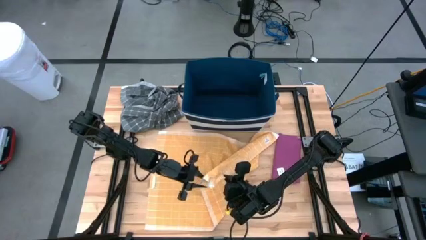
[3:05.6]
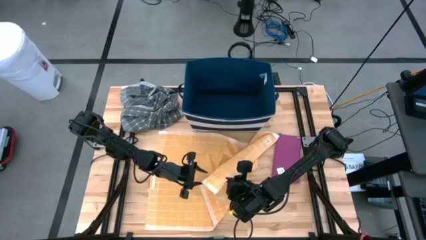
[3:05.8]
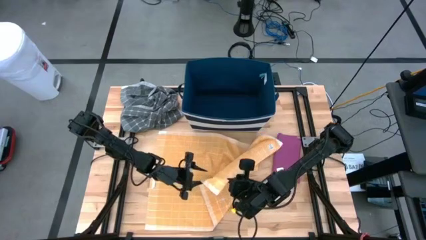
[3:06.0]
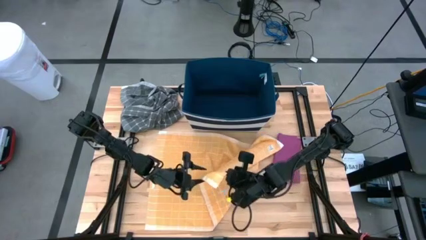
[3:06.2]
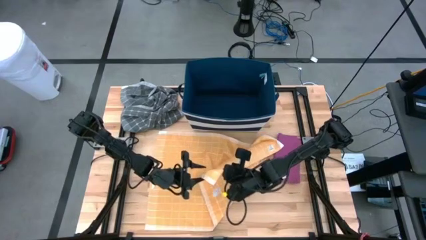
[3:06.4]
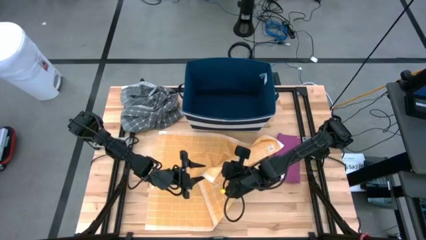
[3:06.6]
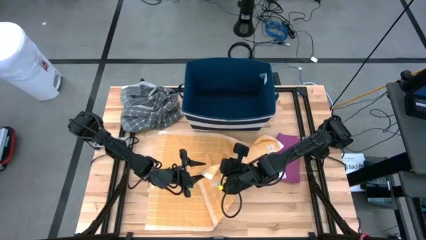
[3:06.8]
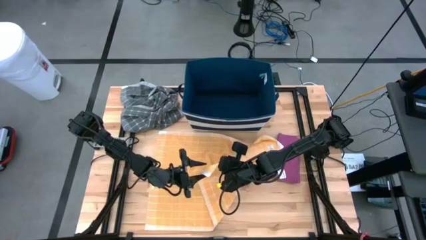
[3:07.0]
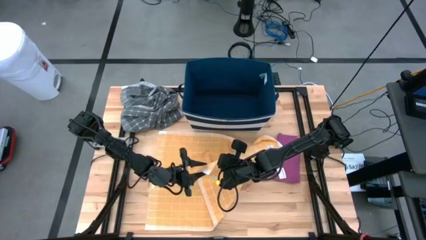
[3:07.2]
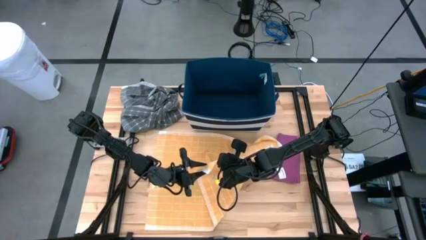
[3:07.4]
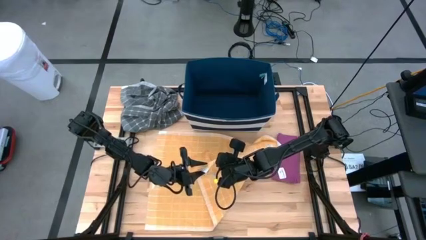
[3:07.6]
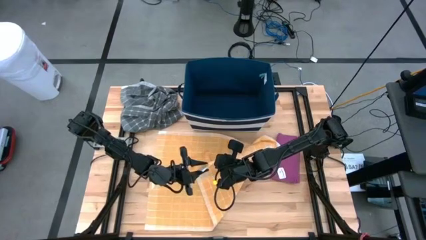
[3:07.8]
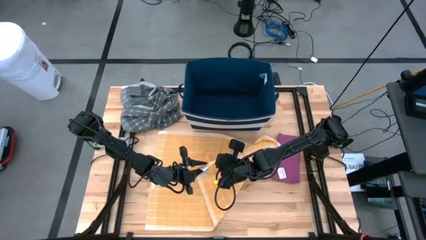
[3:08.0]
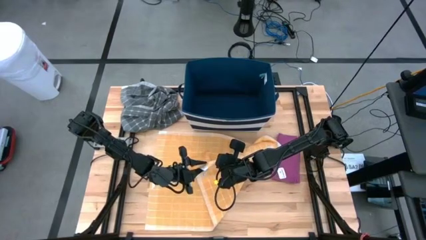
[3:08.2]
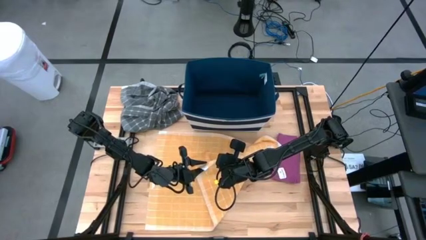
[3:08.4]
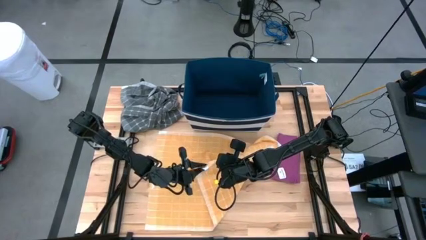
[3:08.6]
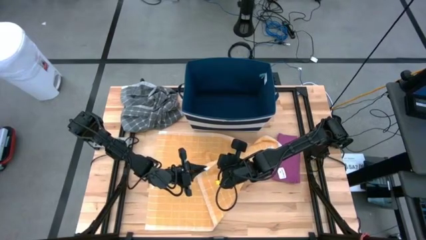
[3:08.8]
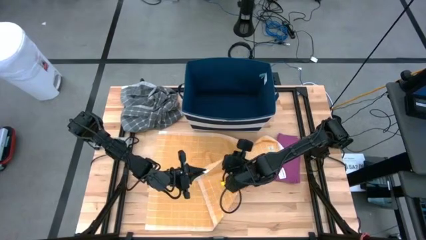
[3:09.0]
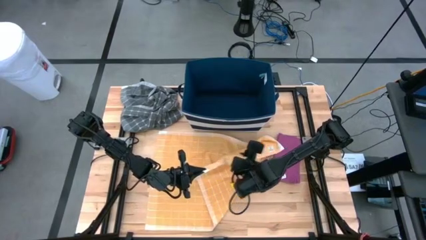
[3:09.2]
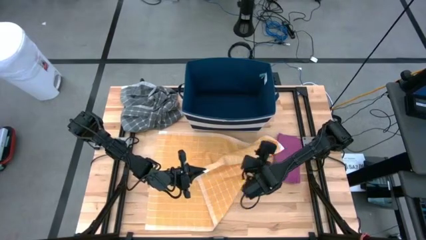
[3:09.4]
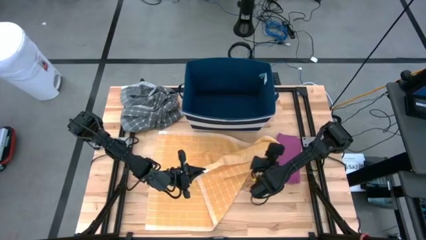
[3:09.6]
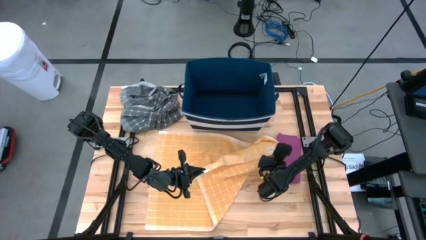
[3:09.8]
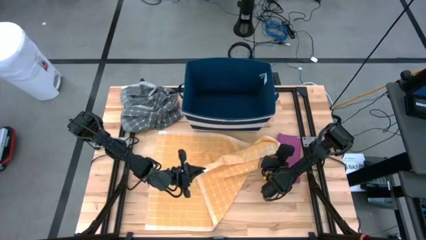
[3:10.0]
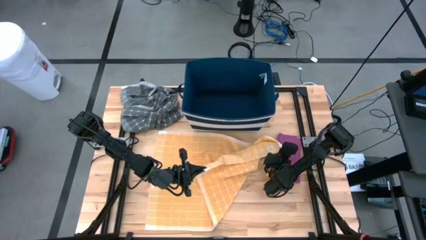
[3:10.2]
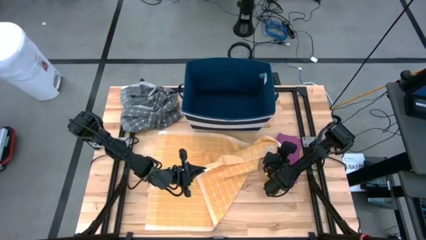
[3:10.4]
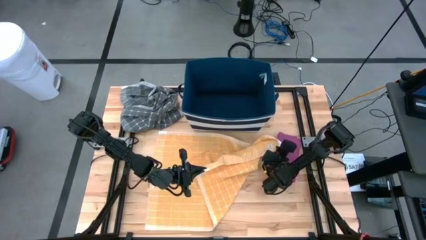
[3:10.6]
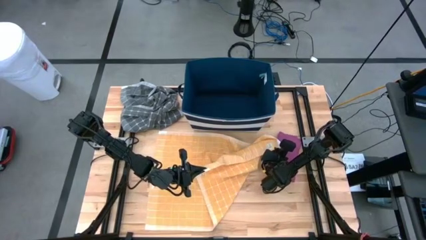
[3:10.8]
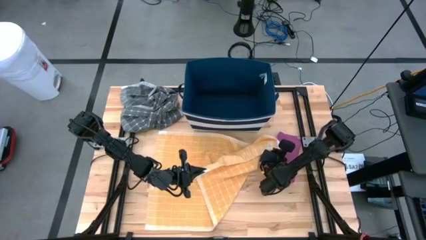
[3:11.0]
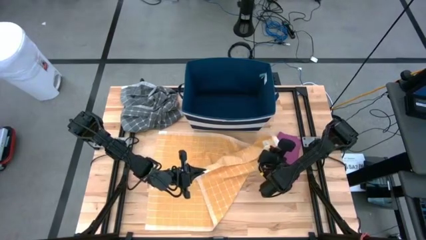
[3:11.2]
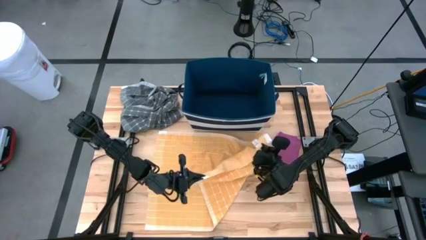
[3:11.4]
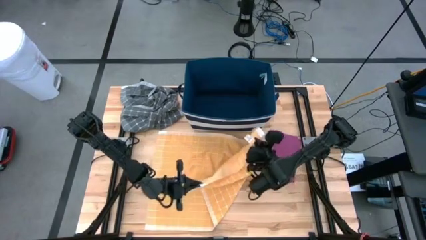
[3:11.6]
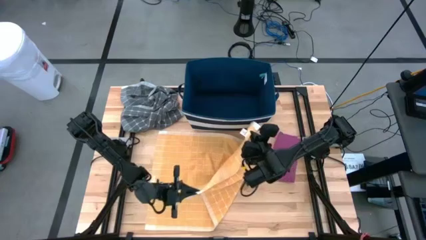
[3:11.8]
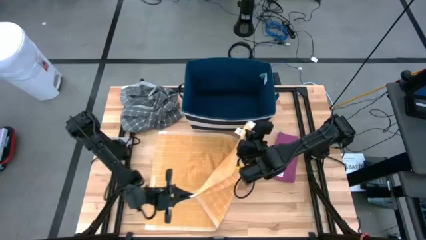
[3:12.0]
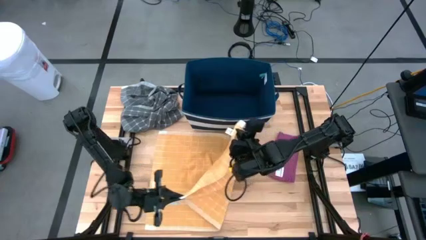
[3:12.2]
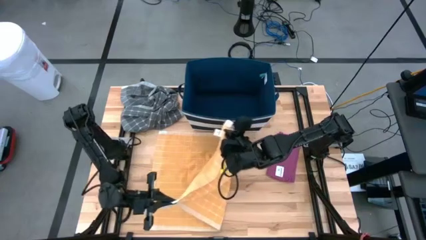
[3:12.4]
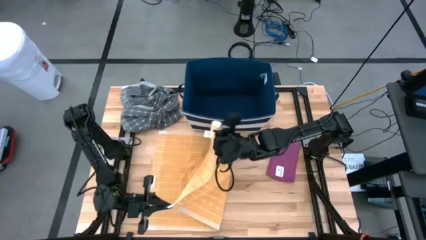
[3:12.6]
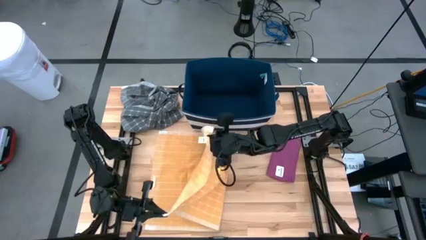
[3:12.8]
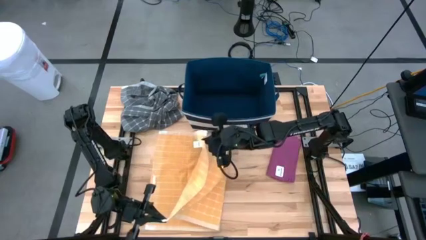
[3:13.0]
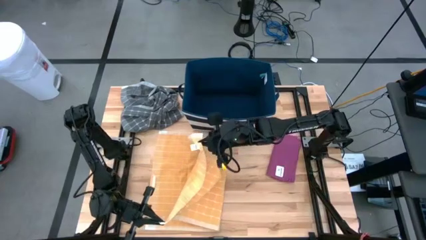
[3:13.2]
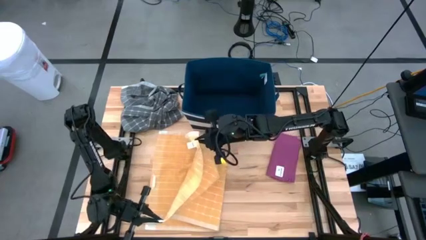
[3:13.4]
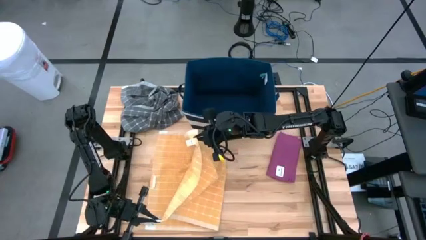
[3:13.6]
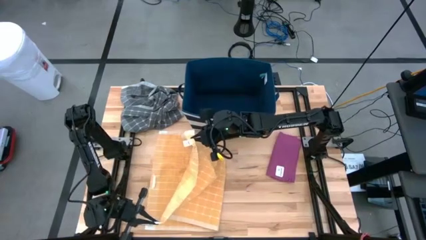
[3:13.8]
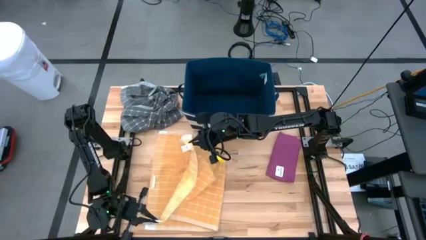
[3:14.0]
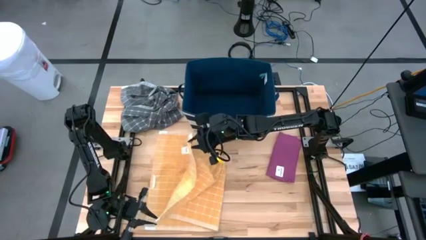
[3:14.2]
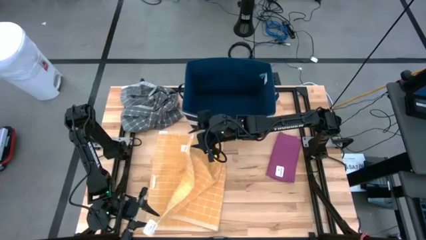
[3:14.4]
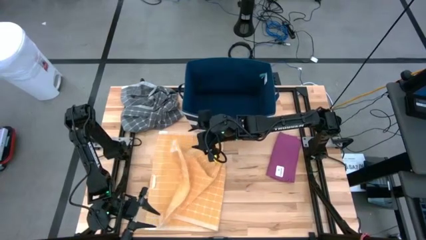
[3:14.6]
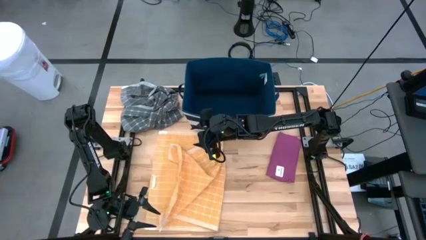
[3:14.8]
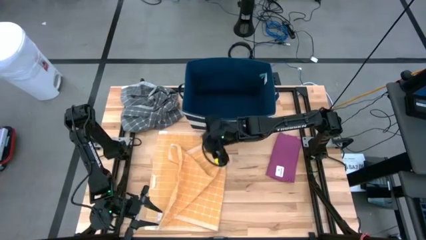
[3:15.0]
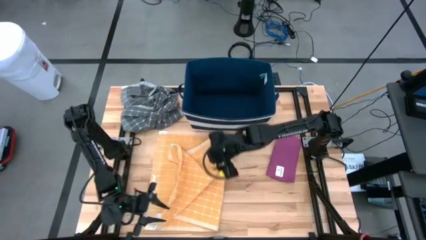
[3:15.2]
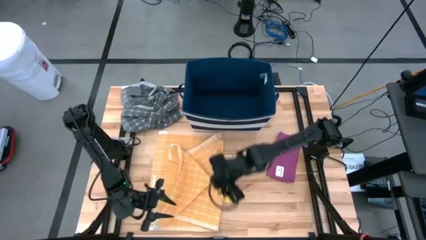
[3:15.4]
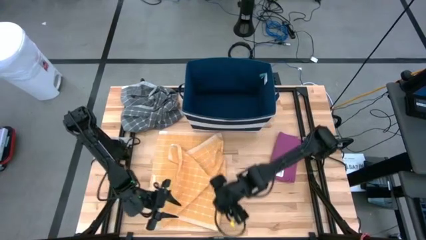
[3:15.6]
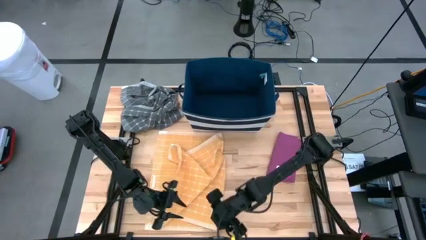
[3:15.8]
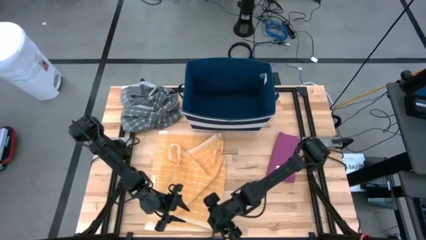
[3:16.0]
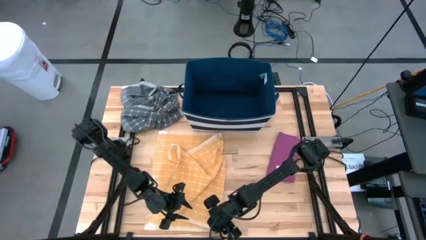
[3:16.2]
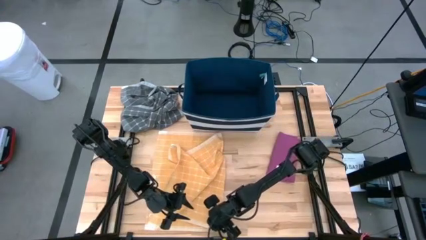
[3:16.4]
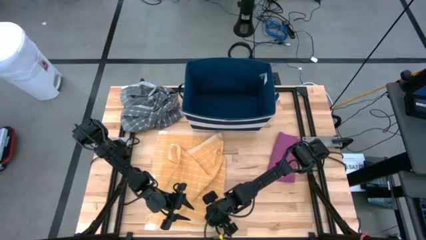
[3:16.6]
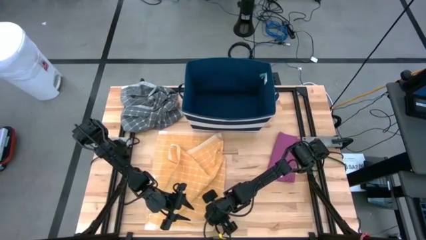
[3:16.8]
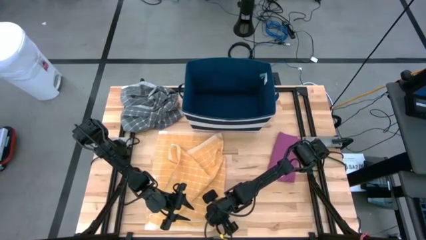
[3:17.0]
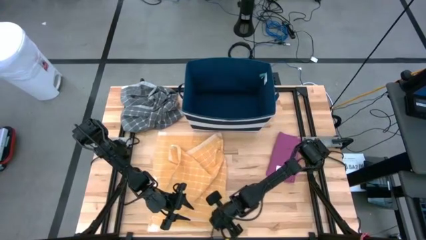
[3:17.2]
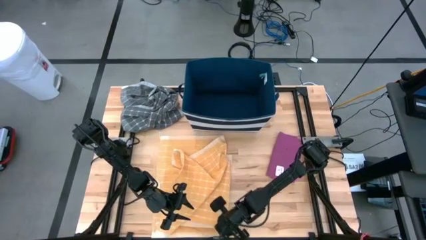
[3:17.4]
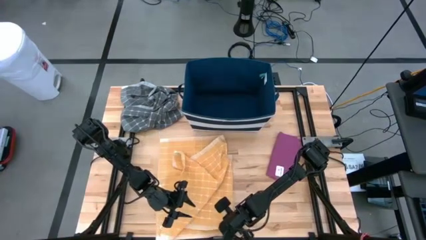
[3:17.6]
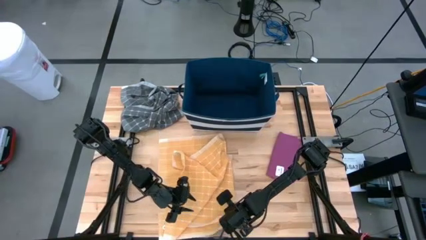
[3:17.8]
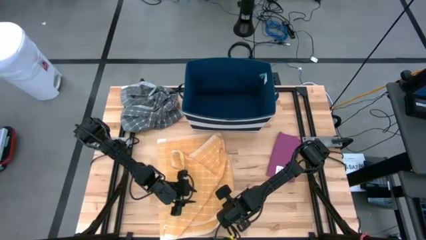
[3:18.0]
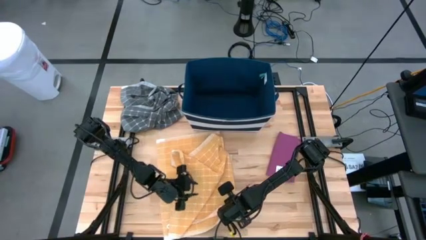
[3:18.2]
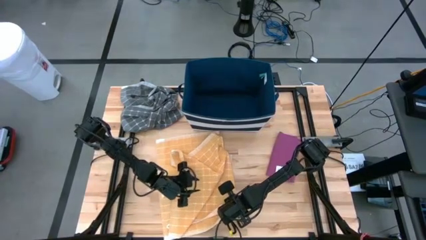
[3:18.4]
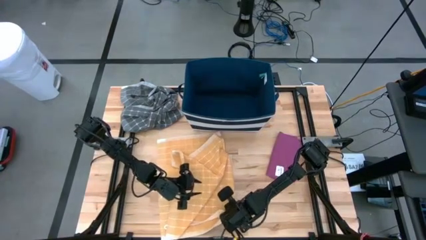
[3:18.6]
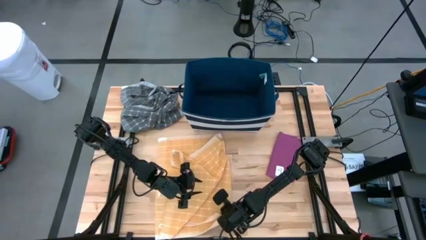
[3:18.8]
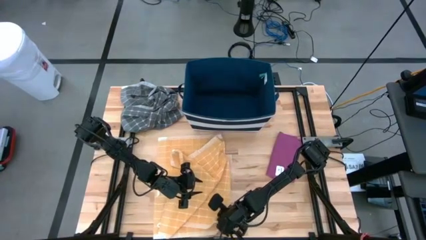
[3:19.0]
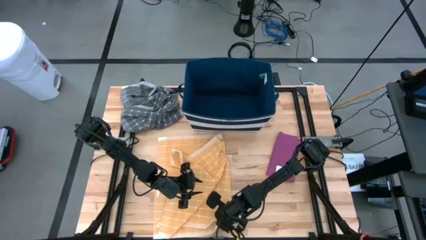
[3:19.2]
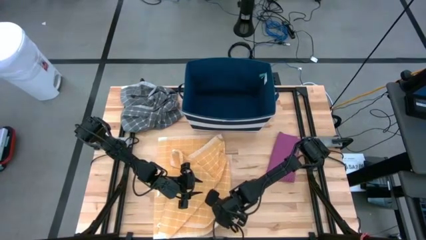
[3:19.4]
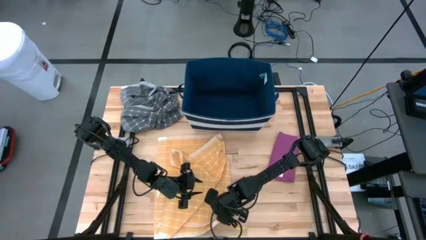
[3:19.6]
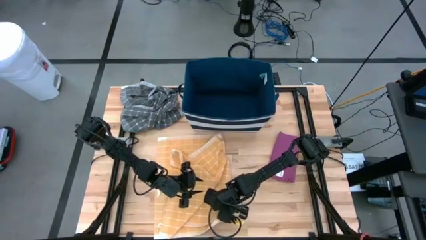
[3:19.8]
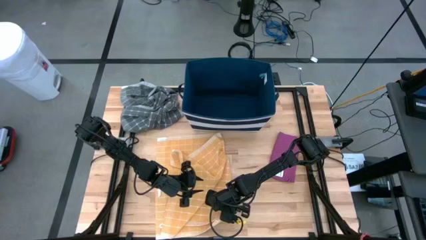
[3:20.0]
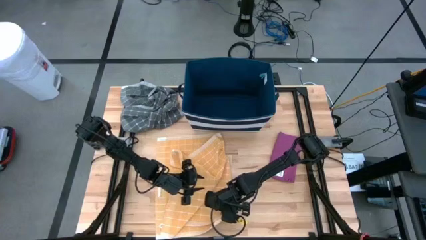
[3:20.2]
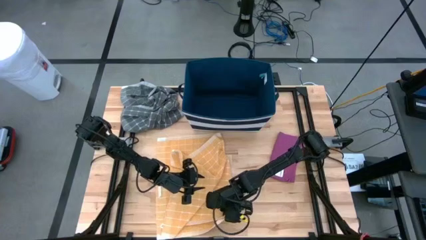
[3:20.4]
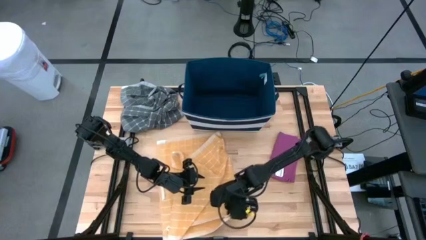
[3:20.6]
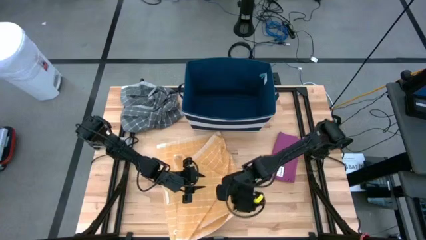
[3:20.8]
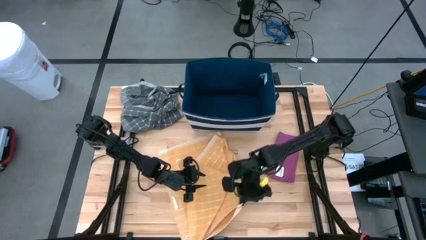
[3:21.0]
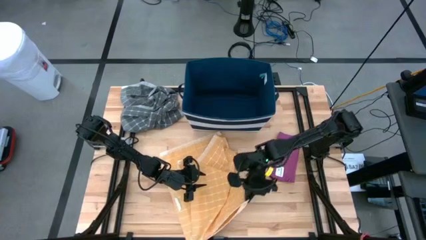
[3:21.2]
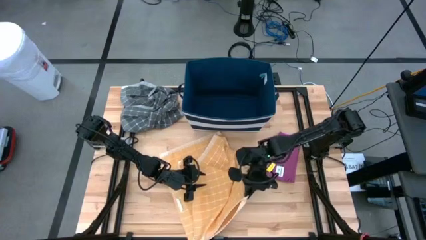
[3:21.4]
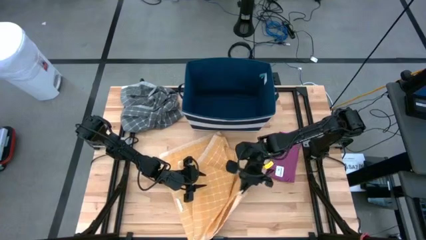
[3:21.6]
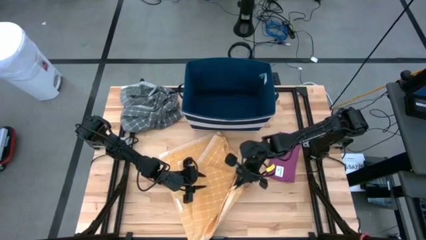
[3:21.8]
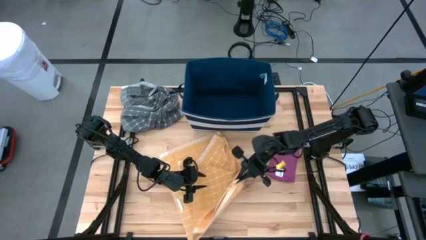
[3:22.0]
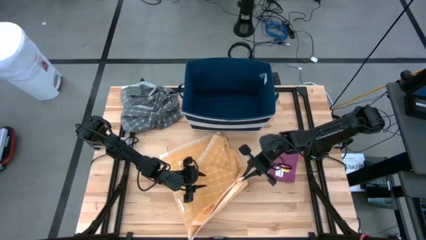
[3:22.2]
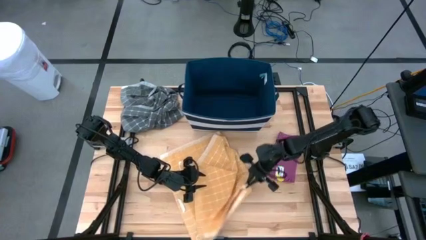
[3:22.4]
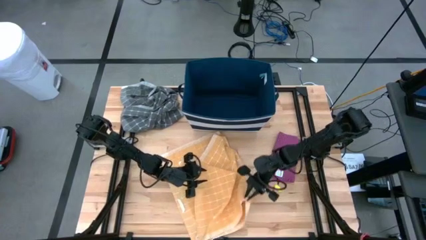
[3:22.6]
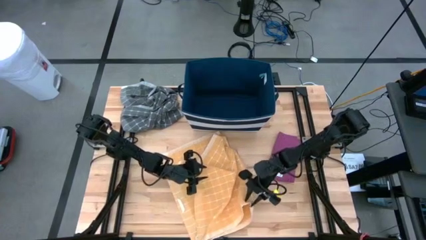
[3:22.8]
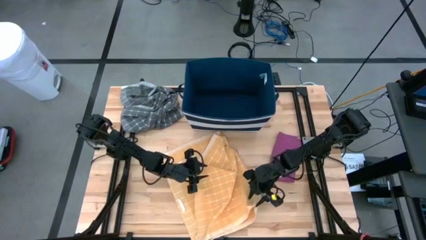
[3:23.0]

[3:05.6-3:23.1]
Task: Fold towel
Fold the yellow towel
